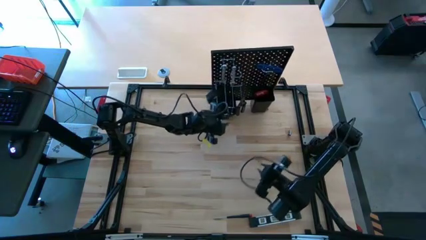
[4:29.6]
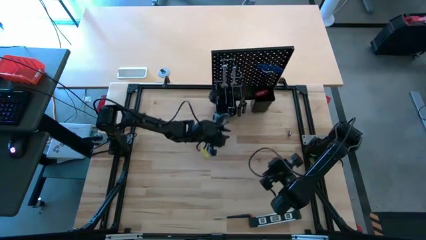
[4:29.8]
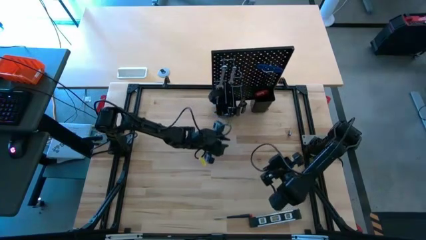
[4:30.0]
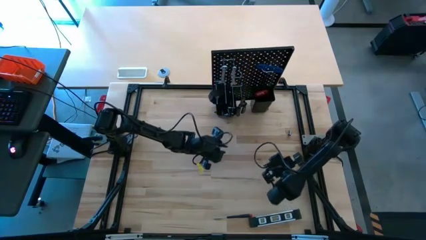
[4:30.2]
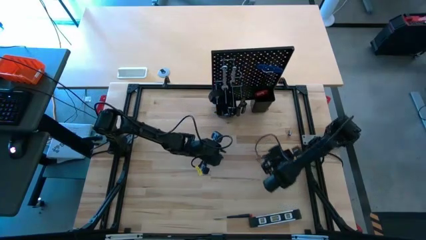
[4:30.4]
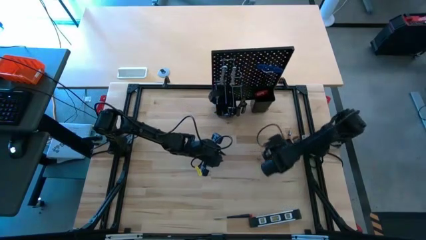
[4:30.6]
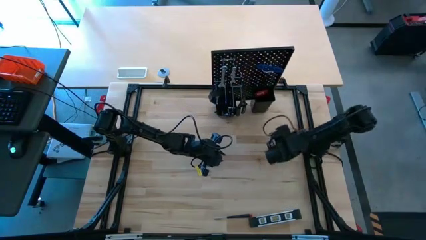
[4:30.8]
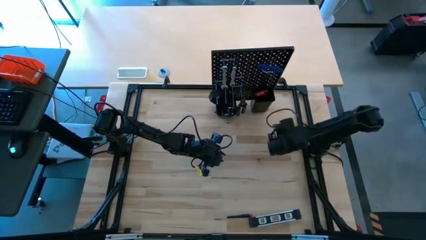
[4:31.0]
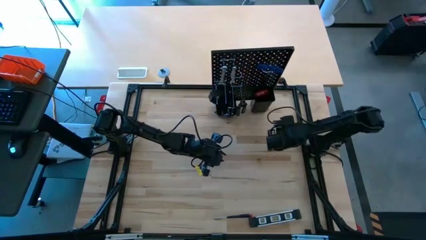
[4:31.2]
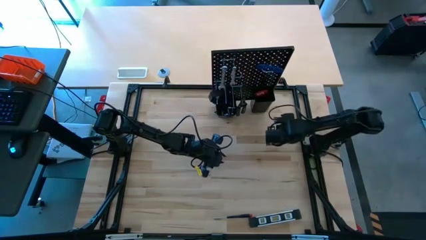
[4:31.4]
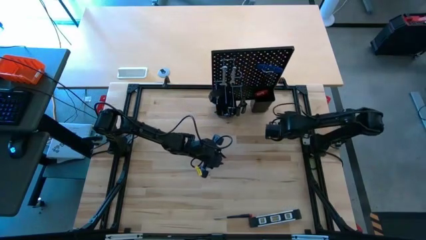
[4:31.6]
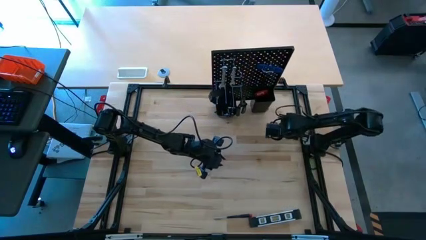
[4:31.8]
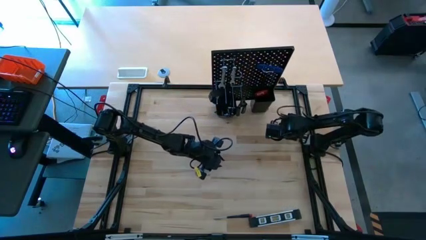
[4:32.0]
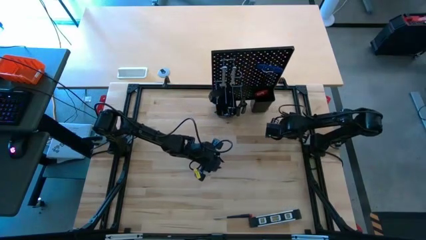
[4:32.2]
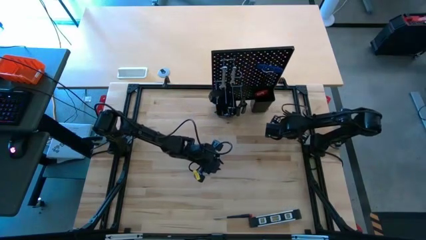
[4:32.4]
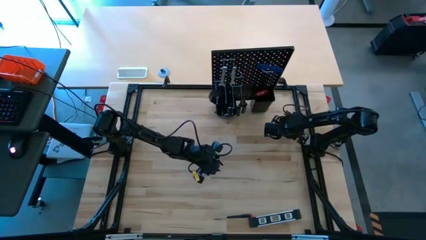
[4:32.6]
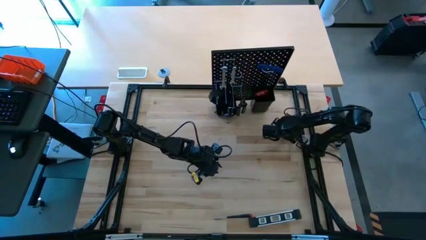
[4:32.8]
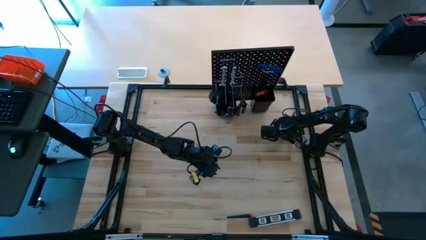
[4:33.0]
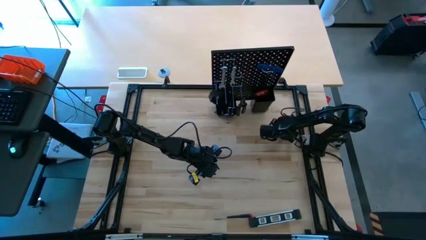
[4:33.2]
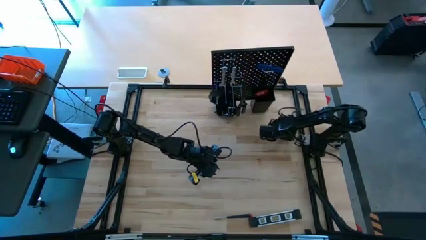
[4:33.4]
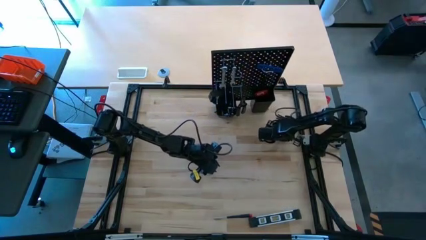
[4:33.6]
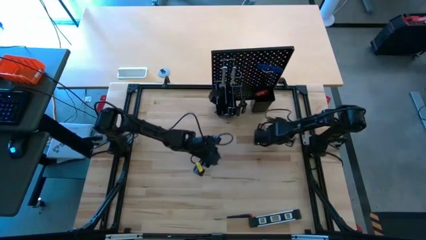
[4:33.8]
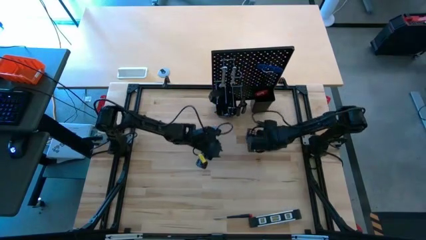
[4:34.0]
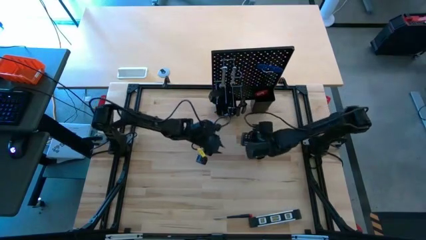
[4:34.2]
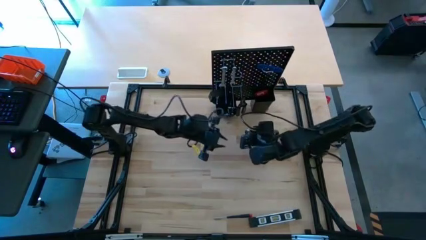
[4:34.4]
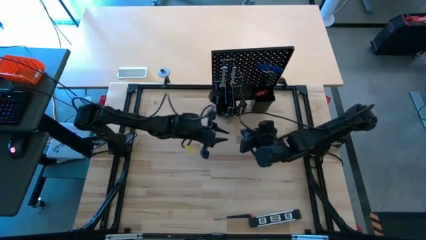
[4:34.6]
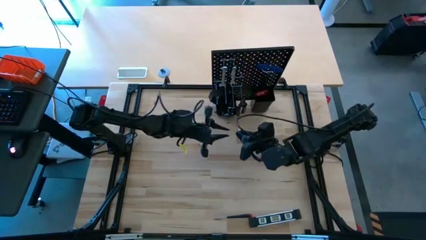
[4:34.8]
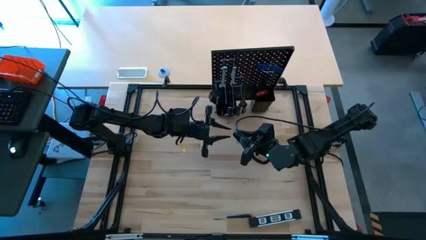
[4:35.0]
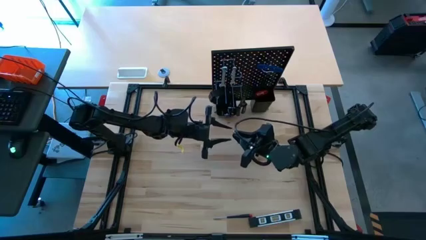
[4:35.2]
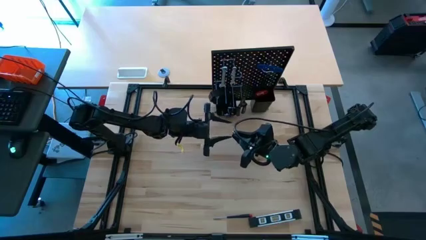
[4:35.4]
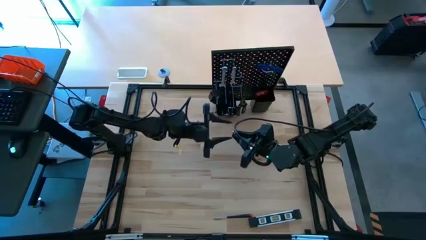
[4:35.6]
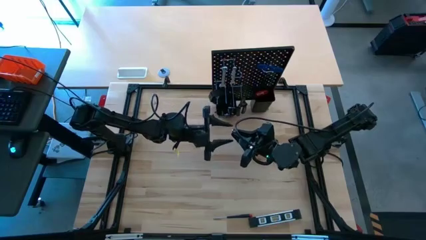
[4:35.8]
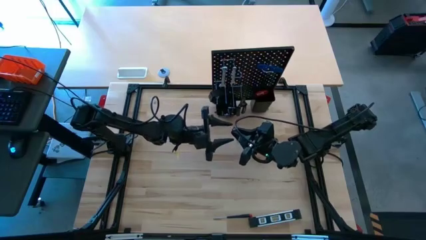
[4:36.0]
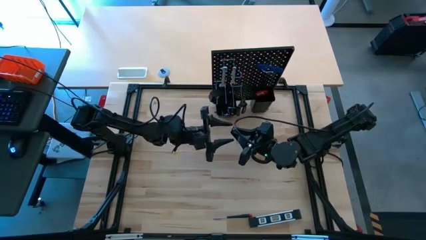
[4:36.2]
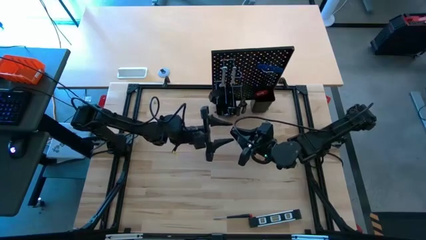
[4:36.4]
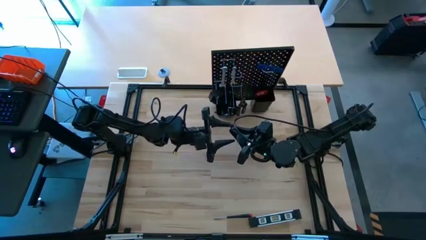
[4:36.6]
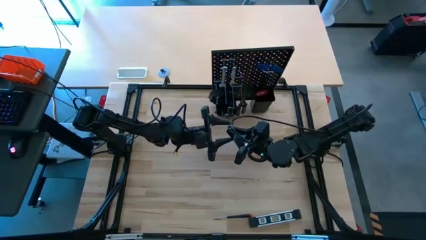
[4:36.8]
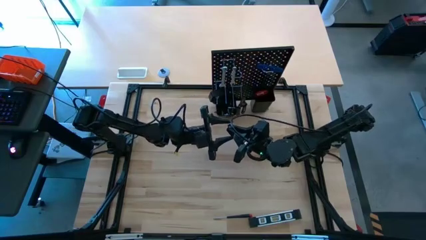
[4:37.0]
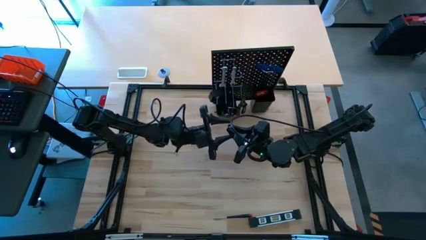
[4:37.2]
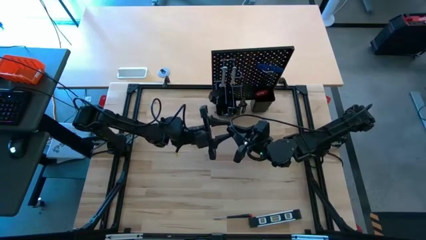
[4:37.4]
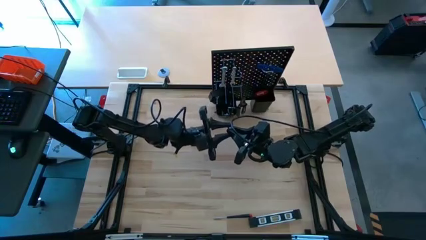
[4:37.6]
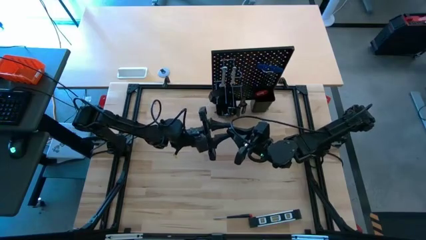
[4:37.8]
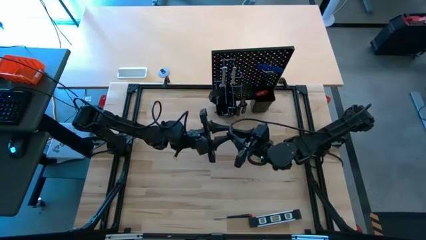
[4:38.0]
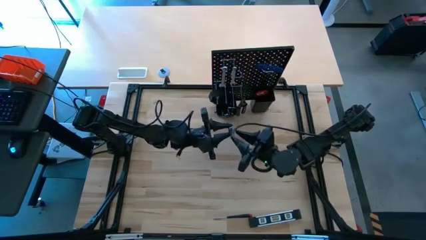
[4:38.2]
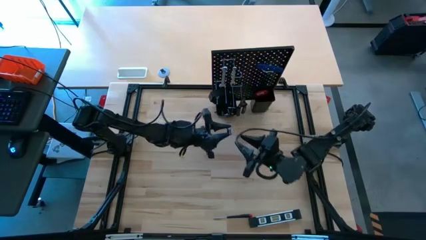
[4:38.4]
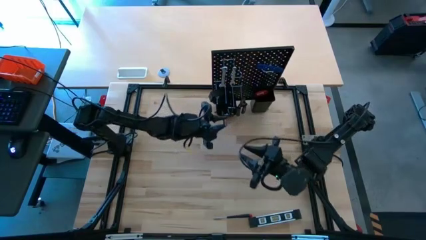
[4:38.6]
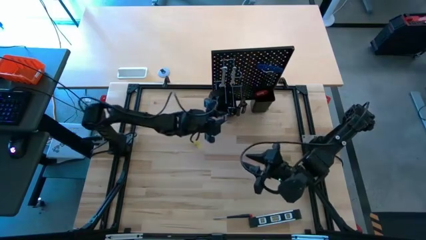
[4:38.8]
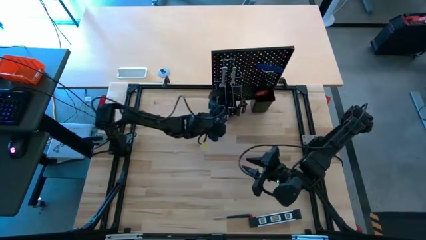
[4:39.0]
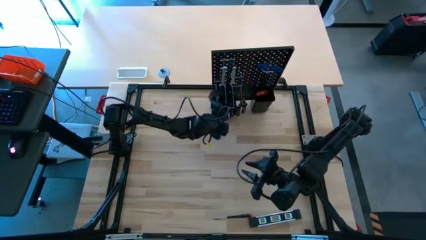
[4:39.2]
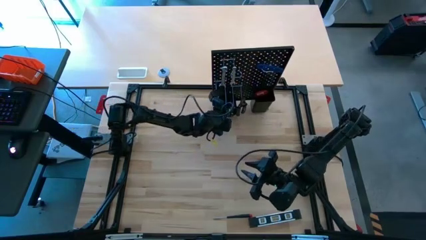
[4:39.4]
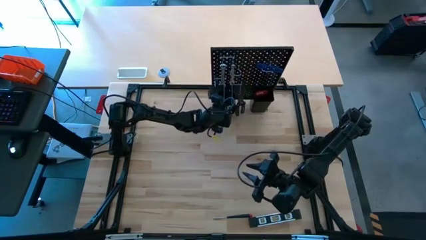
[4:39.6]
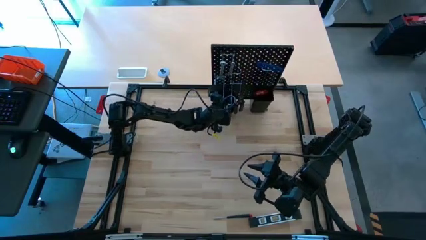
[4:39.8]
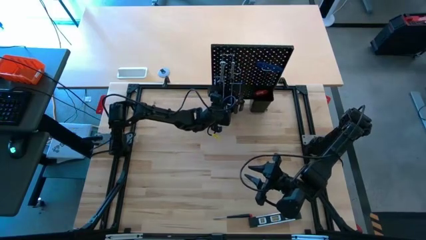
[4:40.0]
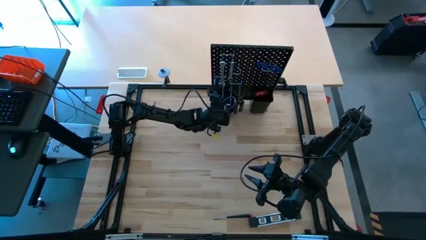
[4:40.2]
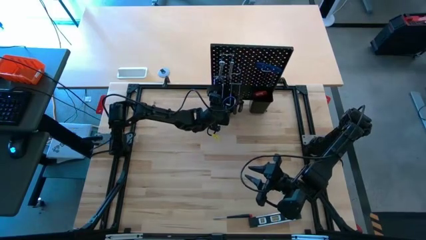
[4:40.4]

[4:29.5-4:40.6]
Task: Hang tools onto peg board
Put the socket into the left bin on the pegboard

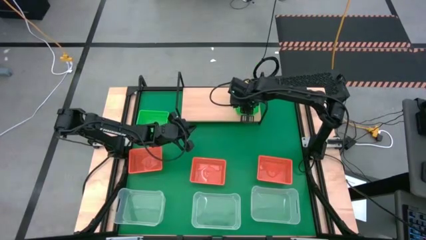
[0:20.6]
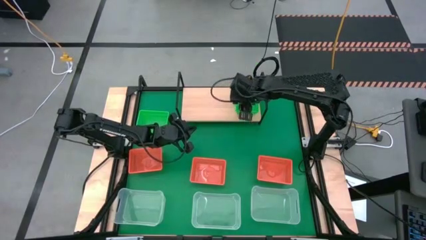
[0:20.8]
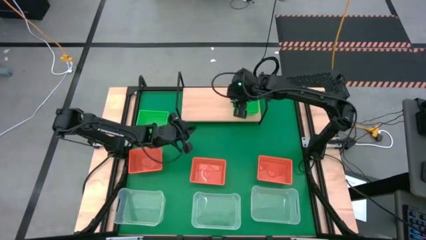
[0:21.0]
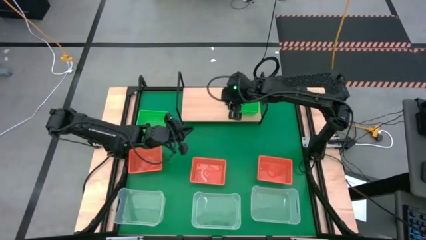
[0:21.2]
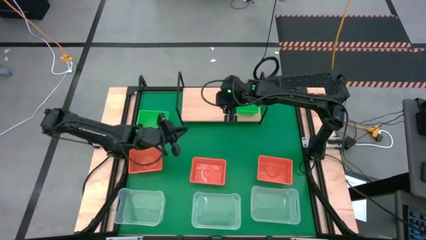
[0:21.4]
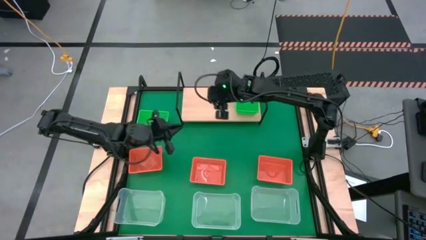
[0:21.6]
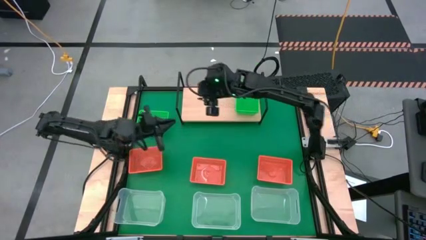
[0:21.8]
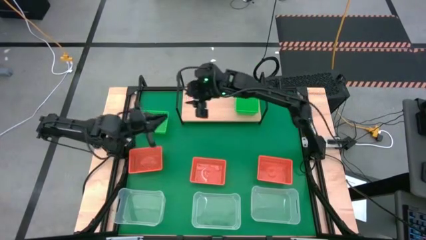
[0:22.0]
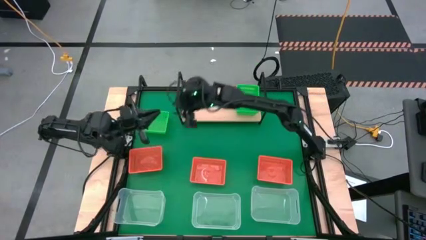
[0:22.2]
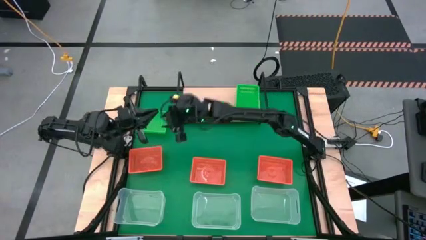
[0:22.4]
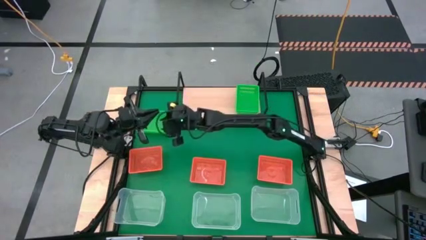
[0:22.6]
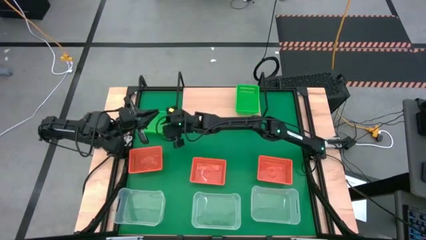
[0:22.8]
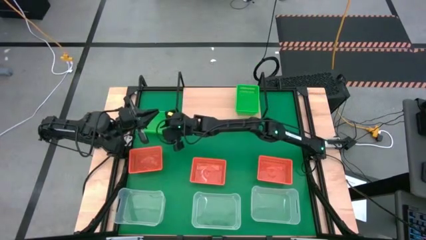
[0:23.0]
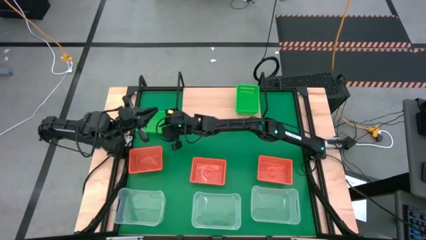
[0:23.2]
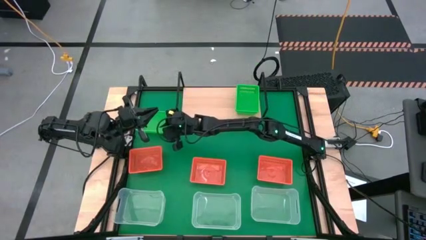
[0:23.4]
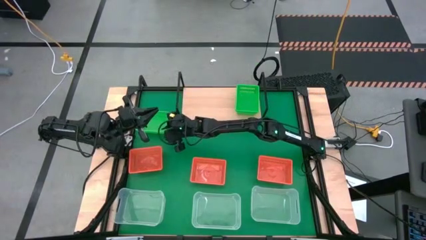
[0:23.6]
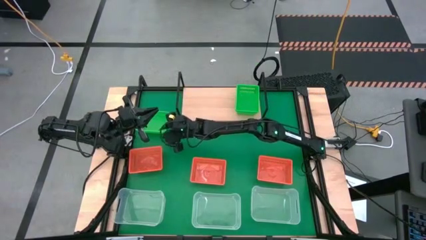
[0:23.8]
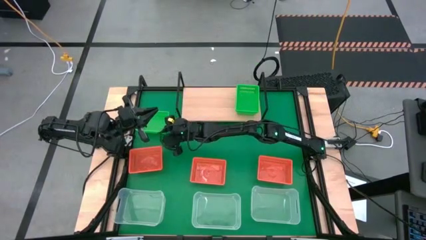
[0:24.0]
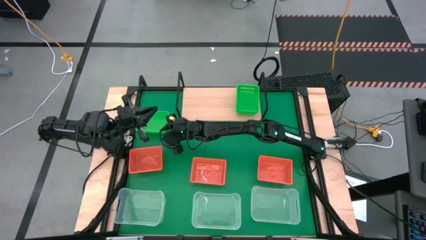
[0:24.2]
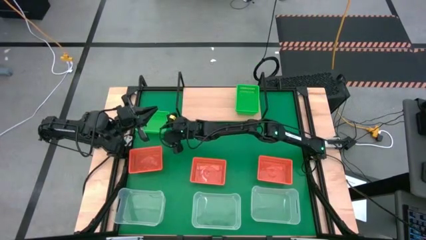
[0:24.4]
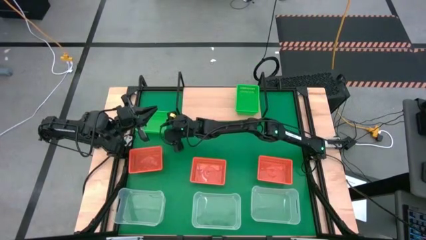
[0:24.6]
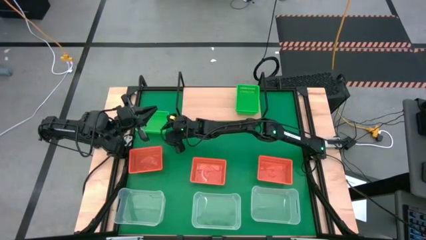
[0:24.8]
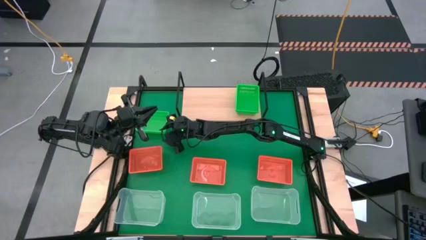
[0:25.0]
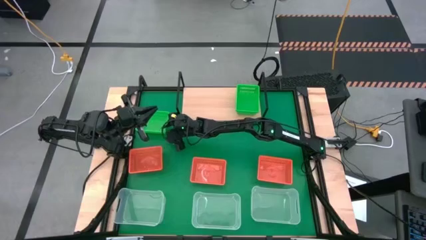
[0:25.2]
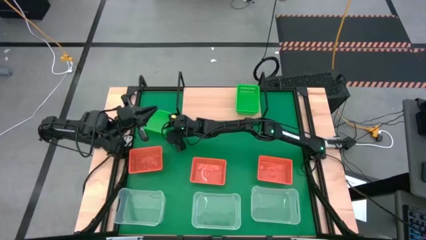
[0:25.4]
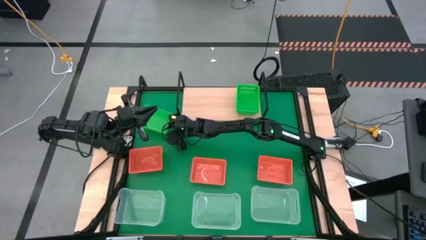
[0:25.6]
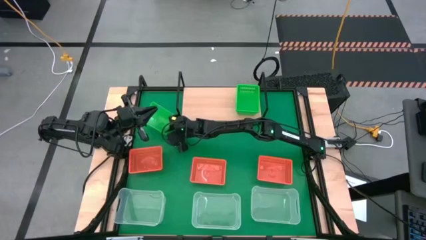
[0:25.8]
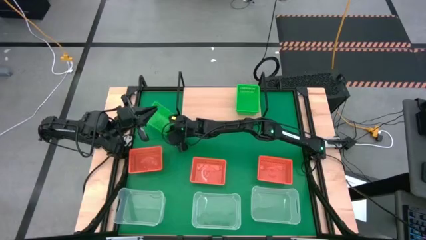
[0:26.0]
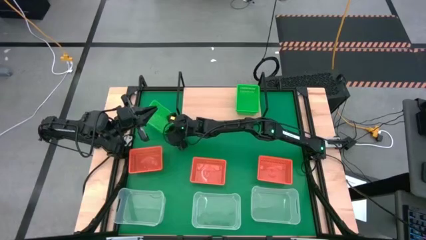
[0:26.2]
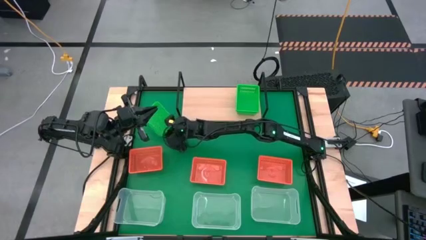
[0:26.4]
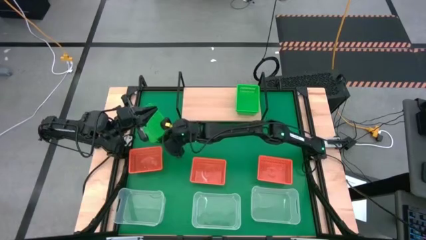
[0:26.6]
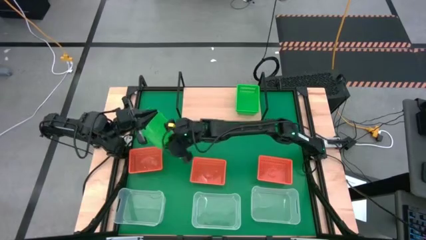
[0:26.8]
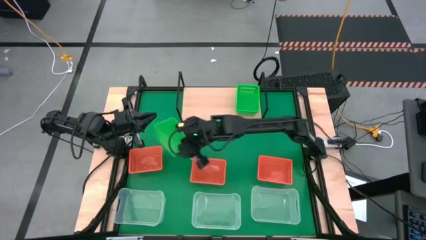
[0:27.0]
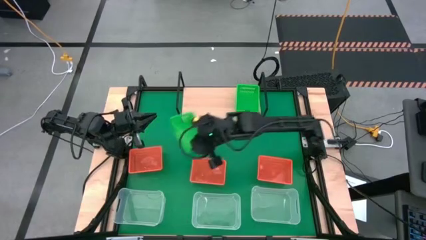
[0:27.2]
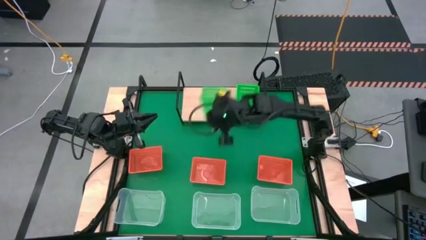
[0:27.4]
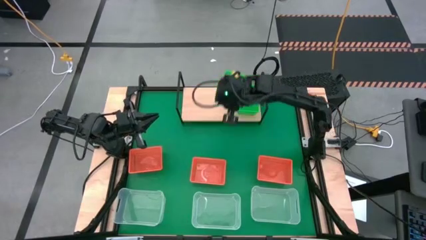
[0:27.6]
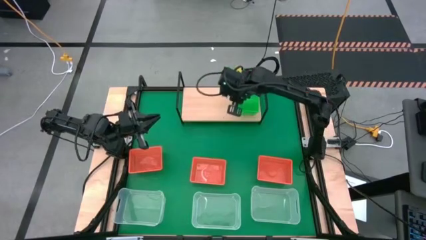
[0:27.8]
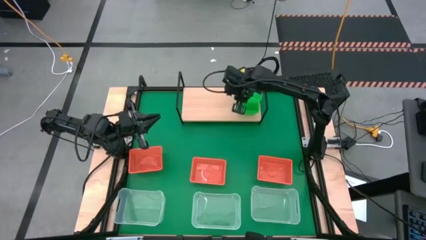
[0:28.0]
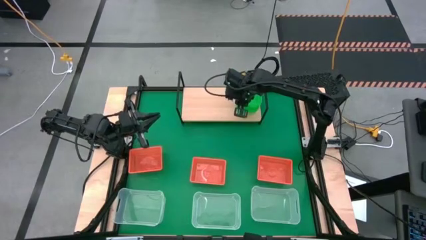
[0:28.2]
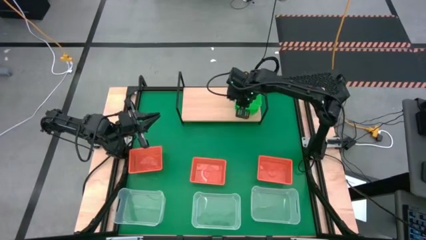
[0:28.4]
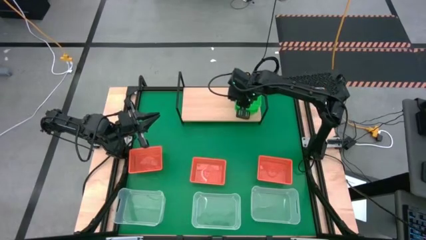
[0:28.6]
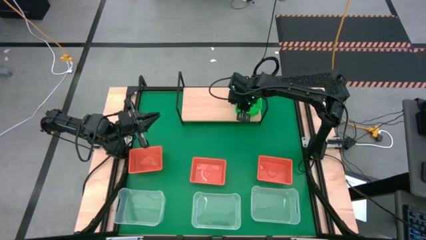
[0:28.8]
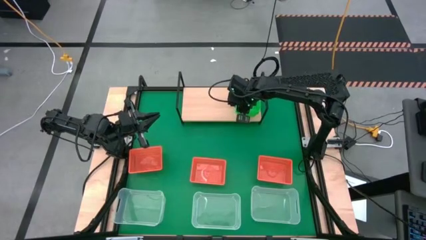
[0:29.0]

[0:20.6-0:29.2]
Task: Stack baskets on shelf by color
Stack the green bin on the green bins on the shelf
